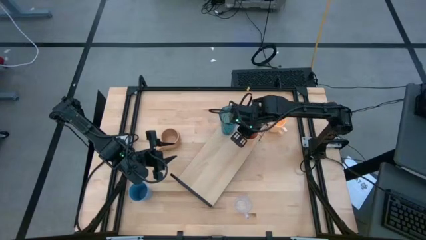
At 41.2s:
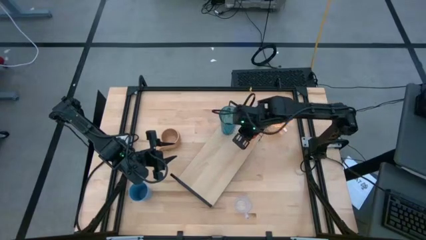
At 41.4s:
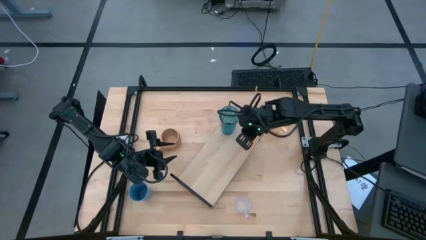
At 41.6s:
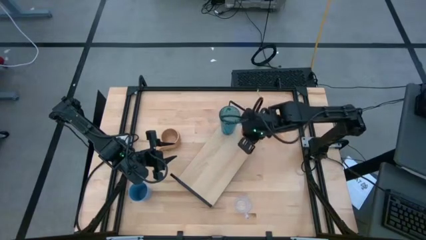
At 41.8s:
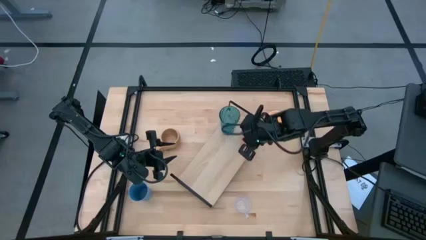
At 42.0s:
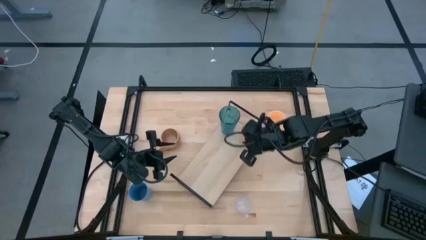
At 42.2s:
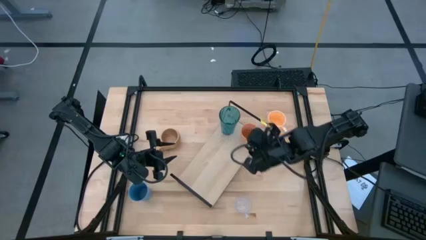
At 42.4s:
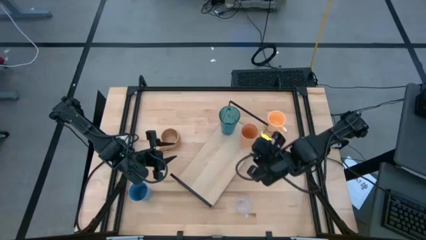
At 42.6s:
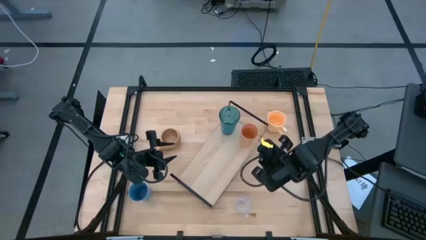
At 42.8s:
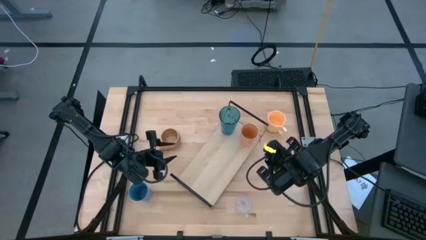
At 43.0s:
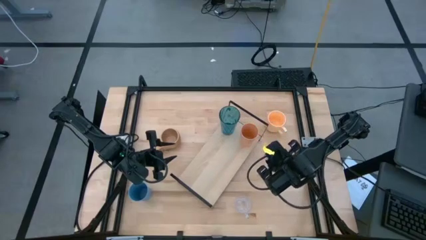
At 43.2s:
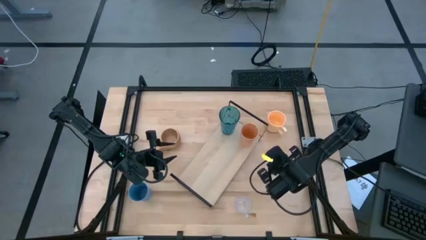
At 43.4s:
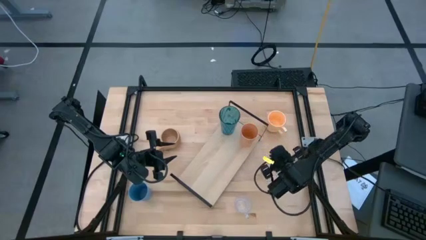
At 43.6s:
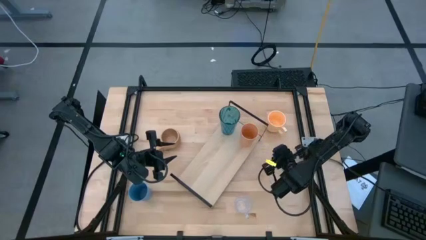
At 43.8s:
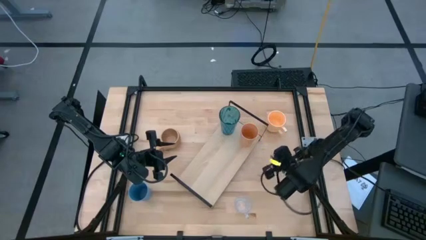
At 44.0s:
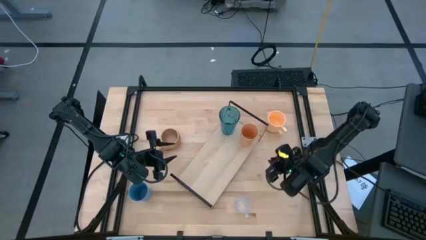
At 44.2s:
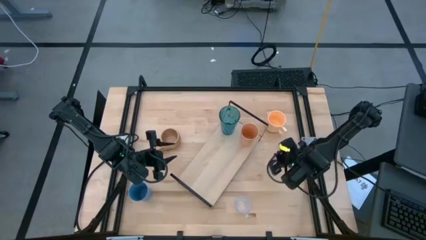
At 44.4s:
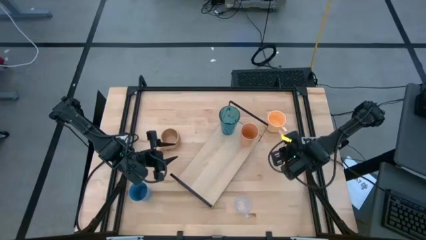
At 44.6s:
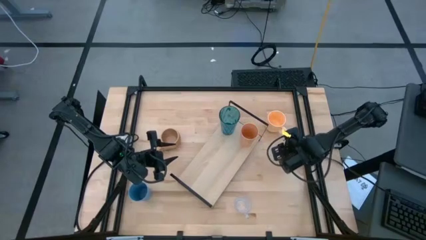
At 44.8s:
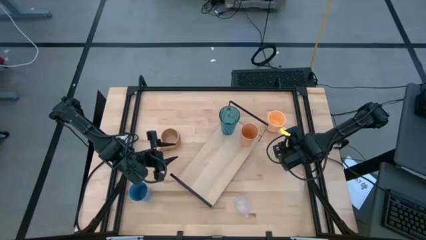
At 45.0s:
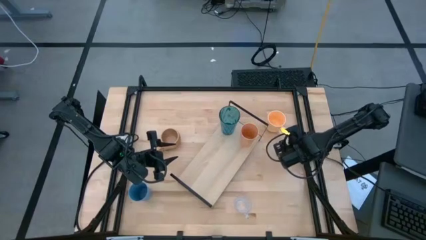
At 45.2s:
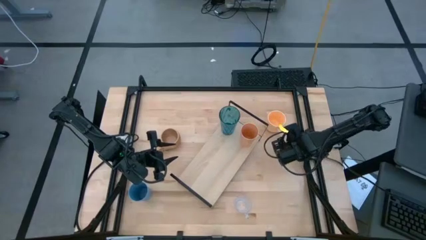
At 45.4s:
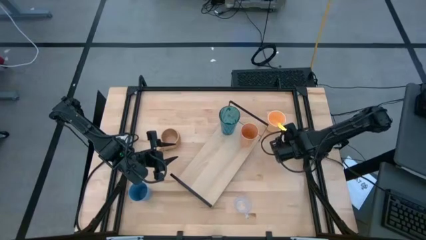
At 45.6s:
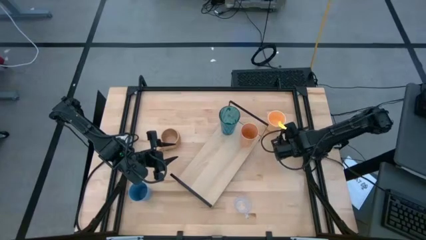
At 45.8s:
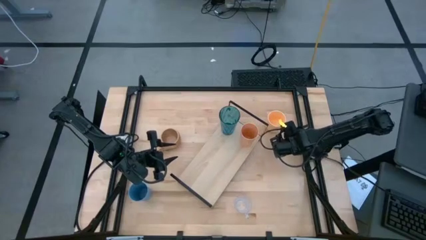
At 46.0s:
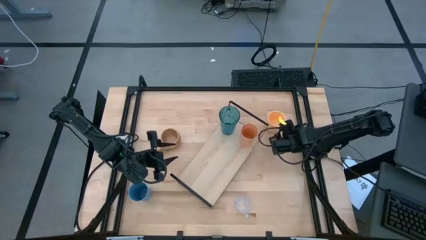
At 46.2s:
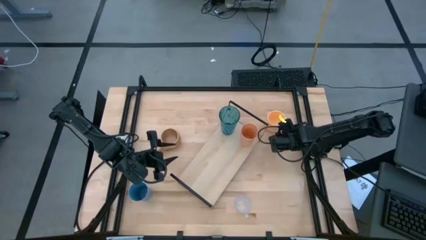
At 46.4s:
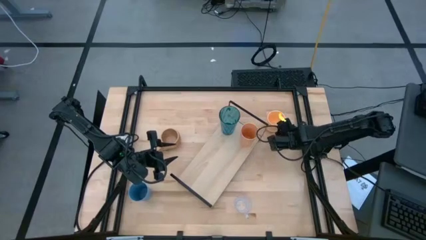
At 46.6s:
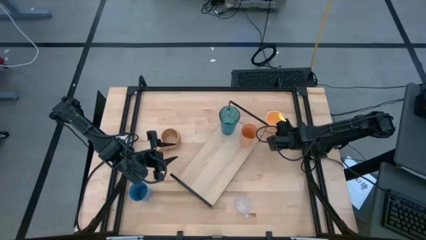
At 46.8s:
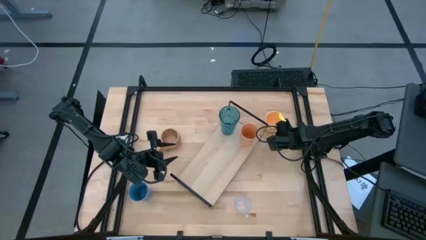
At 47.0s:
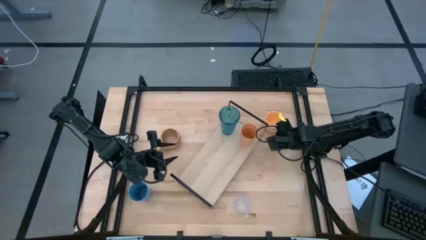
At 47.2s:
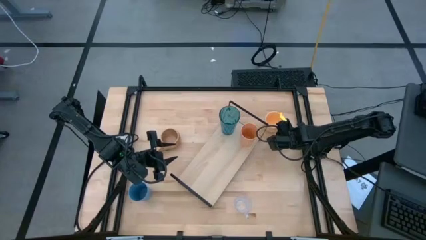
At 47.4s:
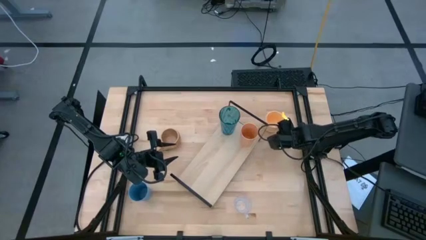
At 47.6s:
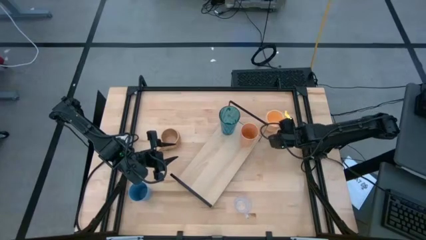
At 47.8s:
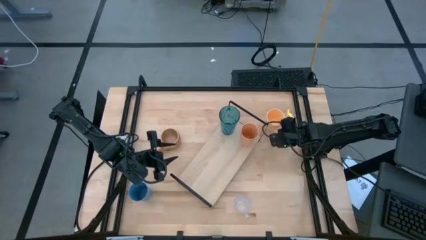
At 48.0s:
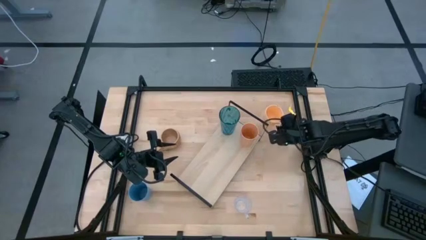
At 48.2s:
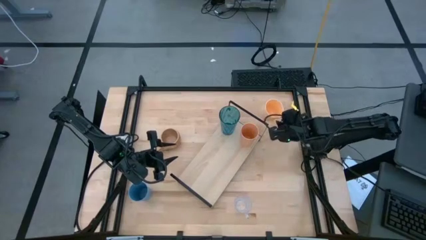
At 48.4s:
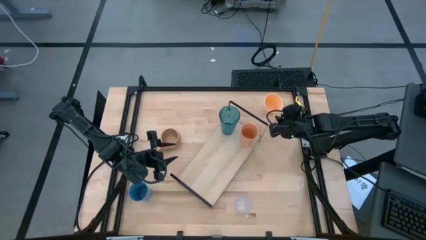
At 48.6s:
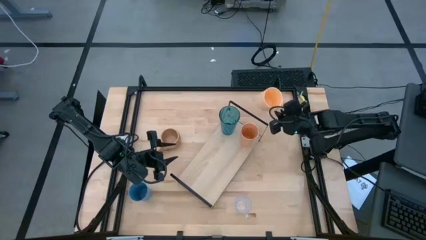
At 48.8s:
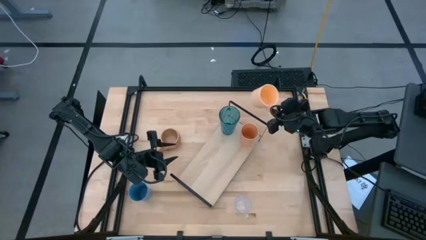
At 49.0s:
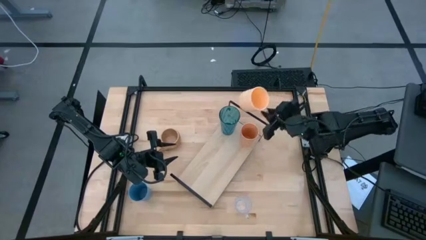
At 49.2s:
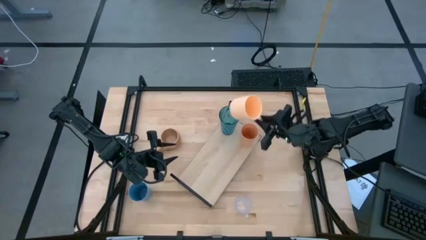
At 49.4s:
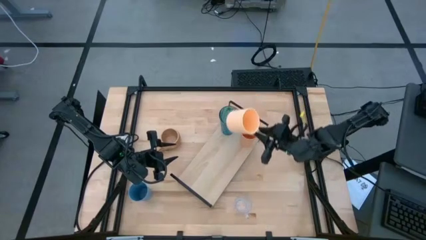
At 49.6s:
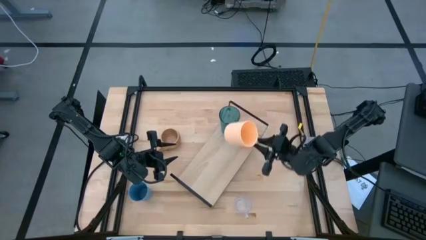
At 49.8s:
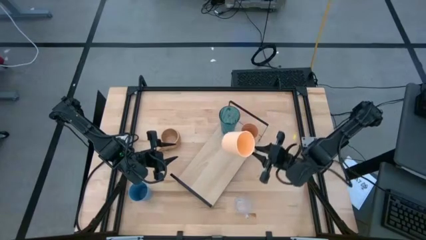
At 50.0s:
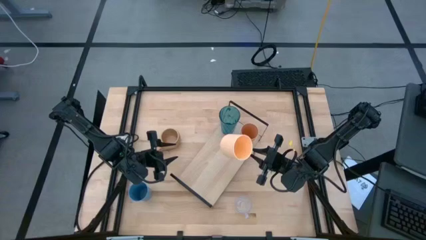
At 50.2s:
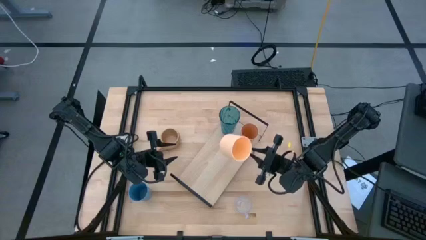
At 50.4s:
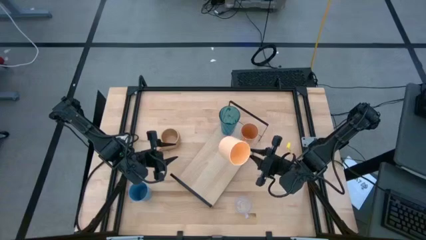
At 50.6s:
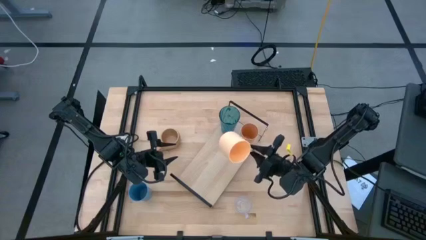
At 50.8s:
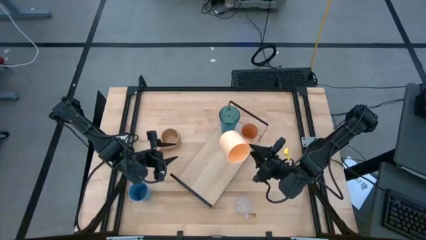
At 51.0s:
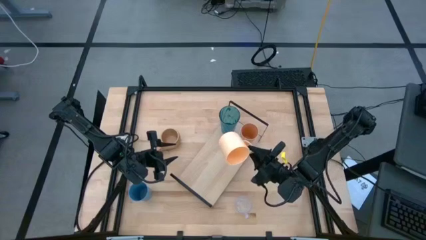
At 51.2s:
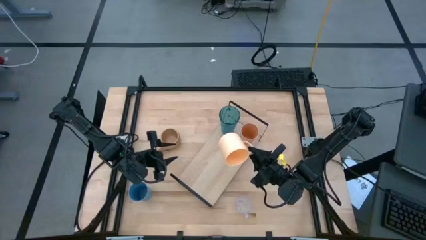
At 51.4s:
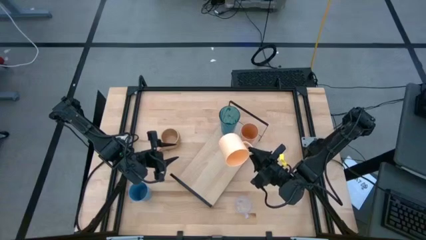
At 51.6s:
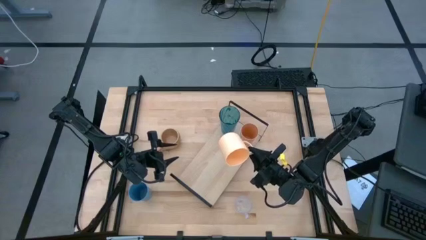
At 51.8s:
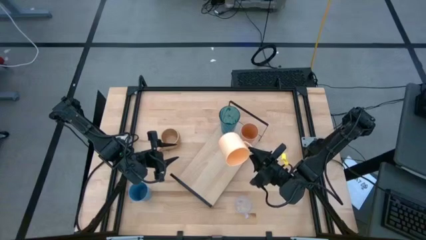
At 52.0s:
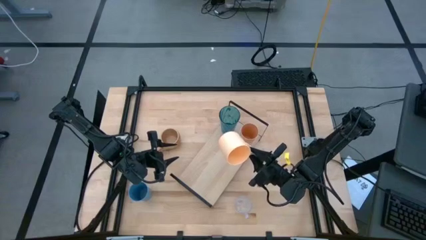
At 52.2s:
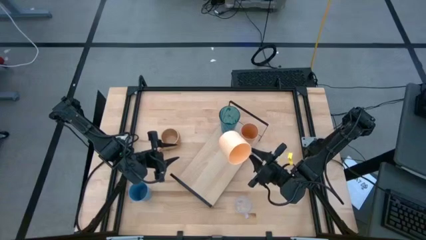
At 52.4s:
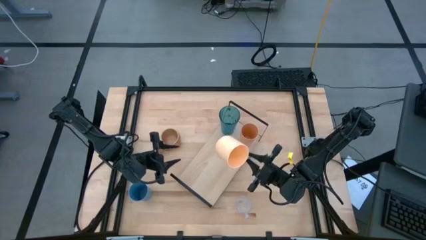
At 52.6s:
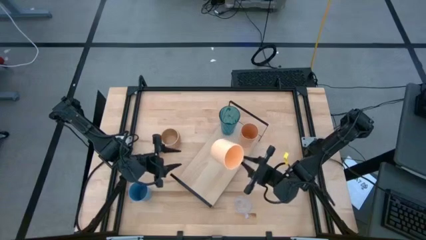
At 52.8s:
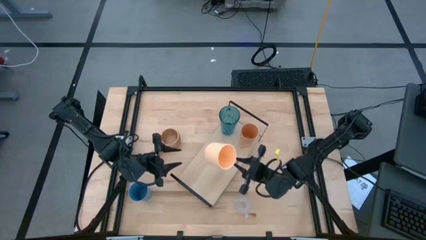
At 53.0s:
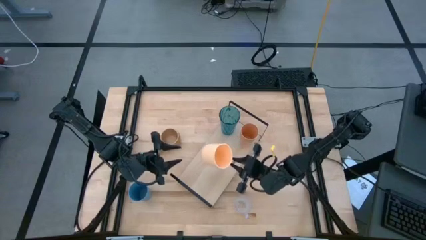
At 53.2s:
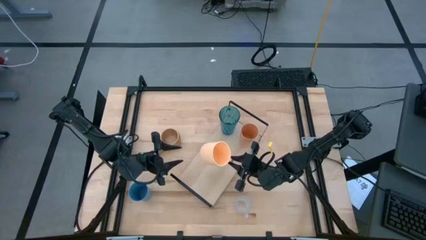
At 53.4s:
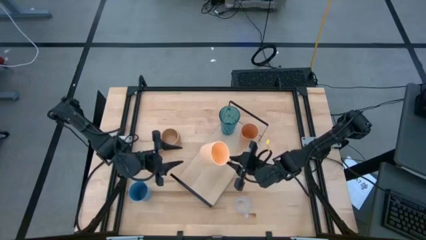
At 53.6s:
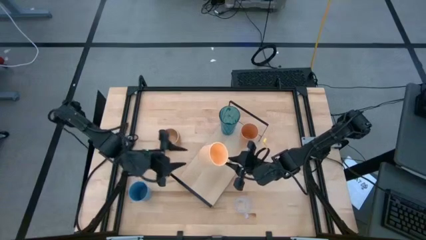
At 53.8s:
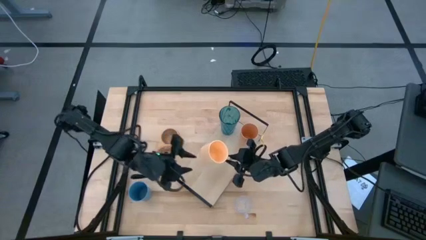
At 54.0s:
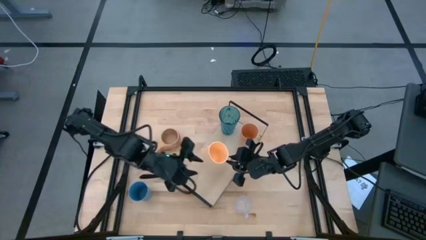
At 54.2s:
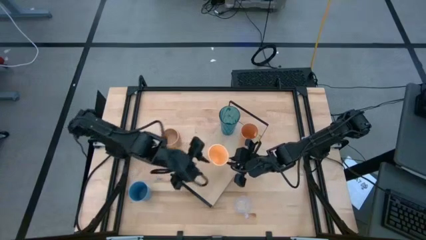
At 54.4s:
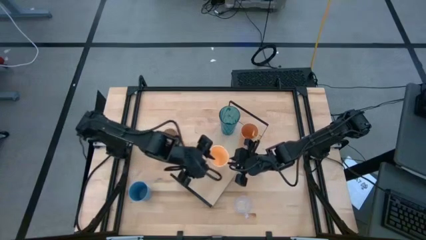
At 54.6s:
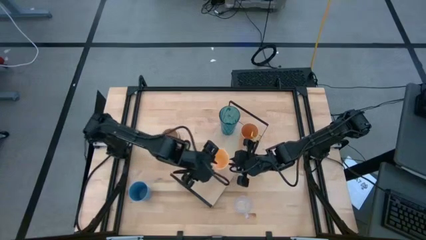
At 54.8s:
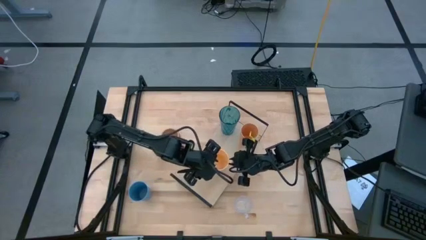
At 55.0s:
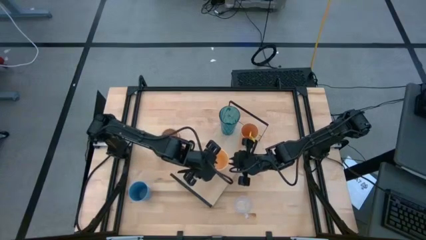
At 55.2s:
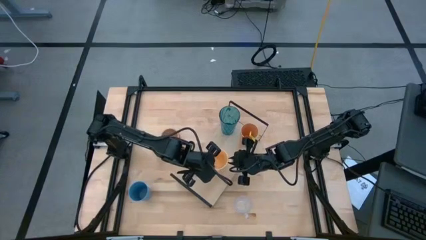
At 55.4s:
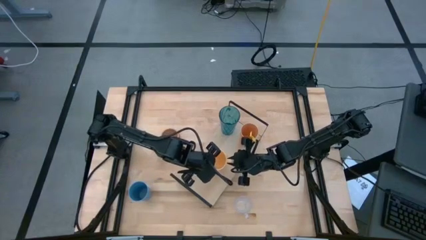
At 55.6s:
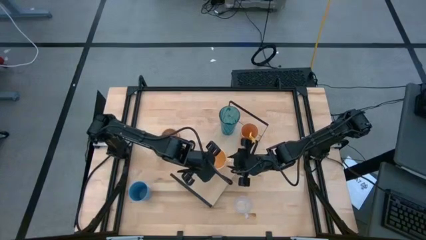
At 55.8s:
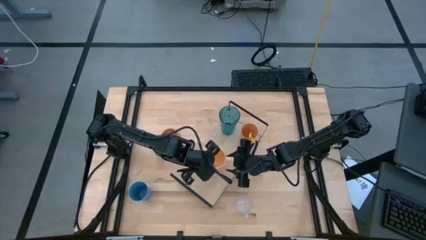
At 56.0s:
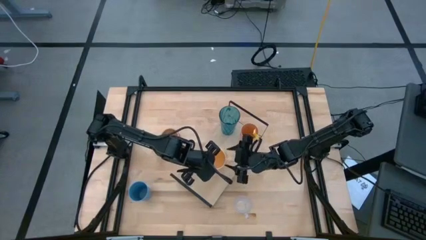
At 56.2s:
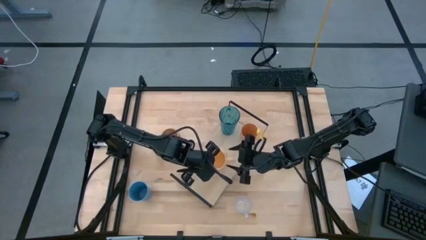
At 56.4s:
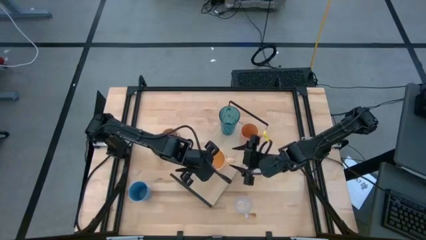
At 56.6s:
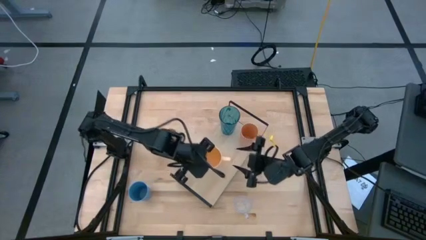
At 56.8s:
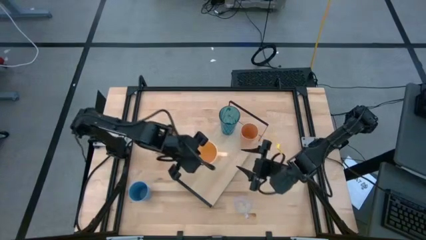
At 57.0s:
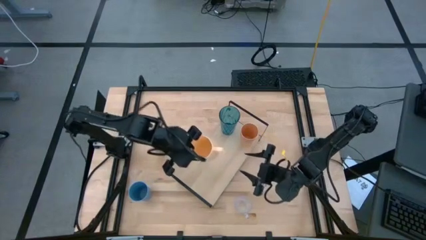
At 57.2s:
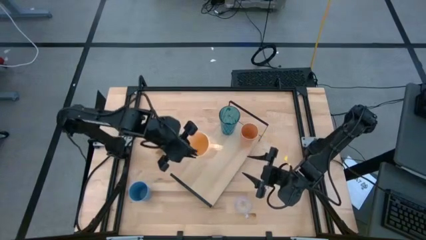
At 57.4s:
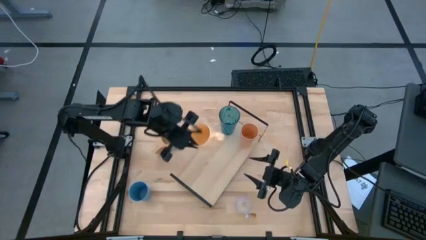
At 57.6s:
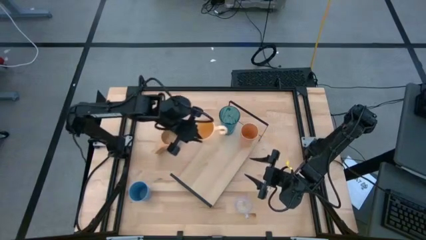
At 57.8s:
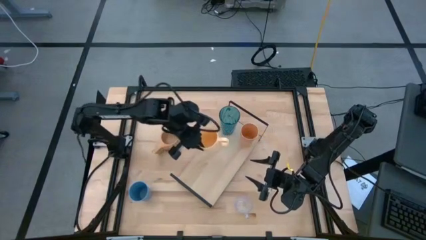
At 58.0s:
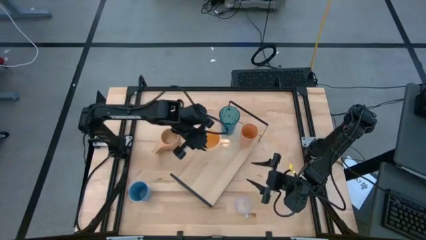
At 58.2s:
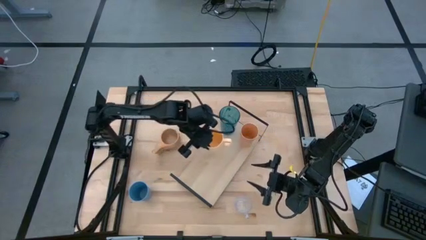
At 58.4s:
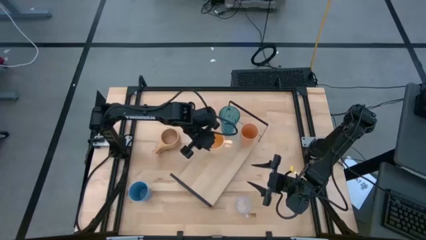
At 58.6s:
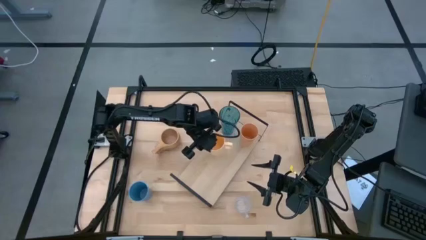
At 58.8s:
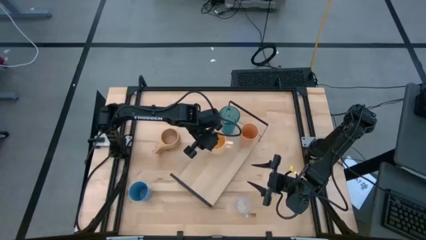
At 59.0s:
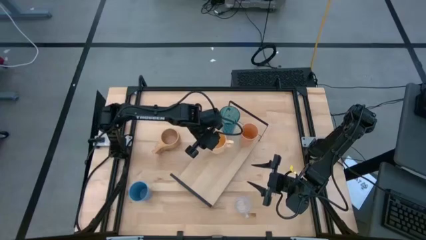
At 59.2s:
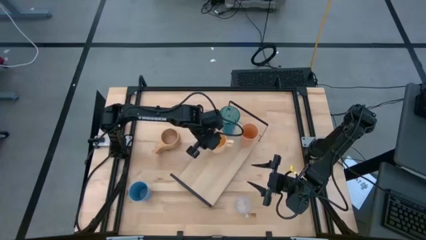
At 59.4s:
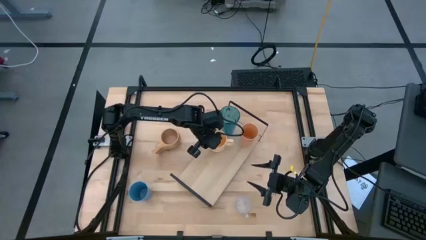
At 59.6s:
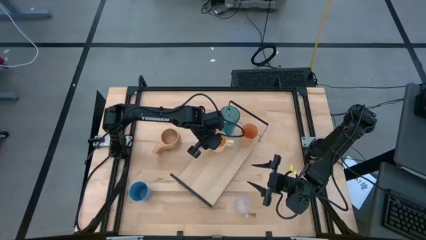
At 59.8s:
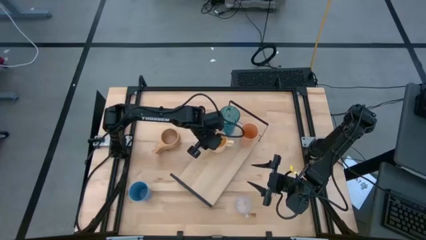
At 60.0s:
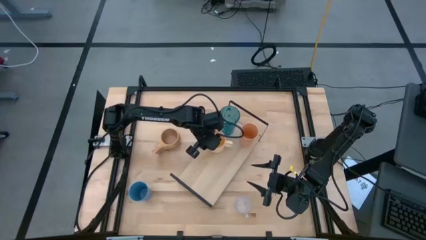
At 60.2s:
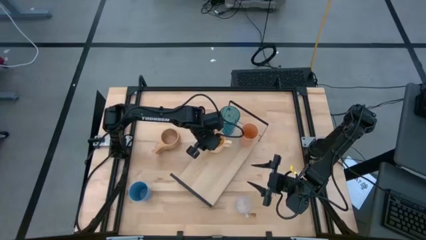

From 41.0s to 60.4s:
Task: Stack small to large cups/mugs on shelf
Put the light orange mug on the shelf
